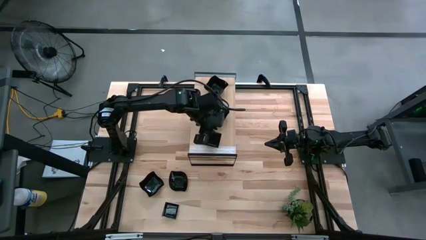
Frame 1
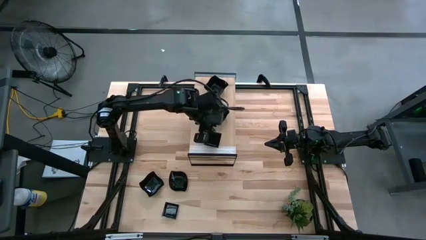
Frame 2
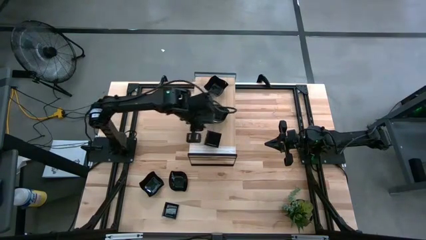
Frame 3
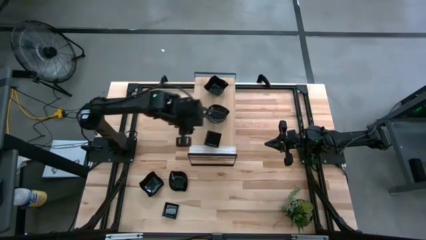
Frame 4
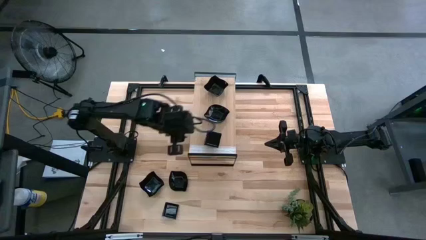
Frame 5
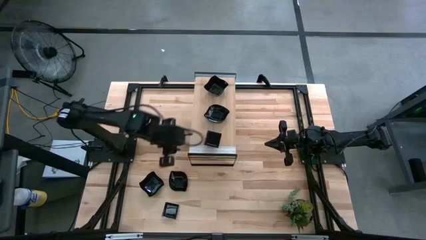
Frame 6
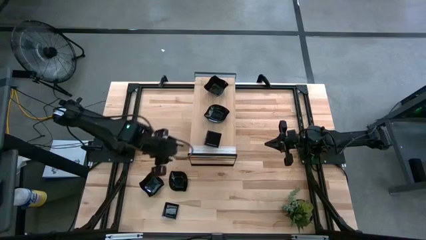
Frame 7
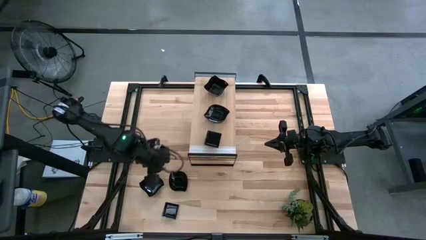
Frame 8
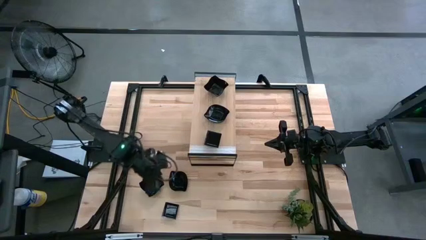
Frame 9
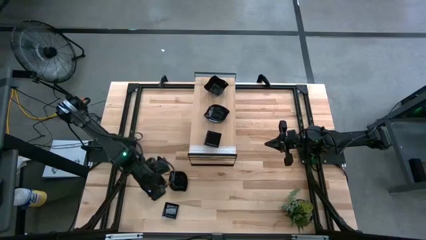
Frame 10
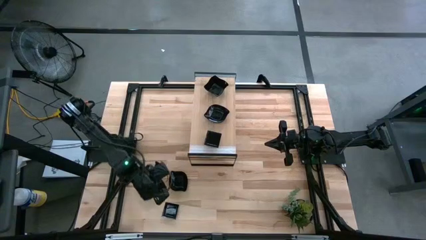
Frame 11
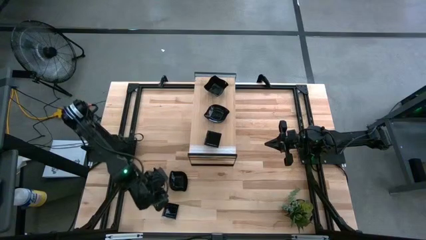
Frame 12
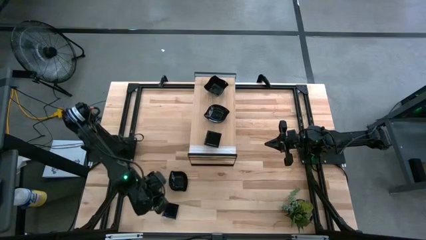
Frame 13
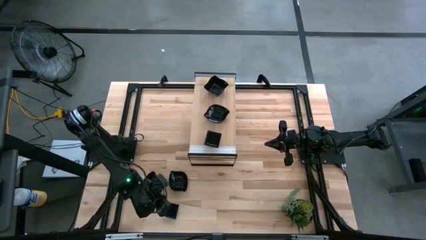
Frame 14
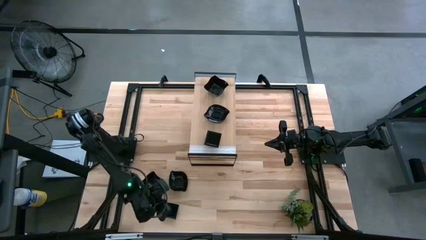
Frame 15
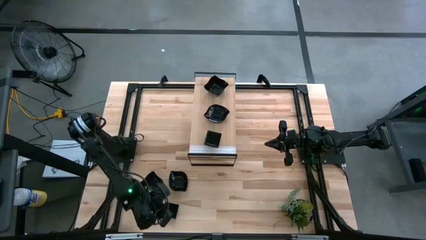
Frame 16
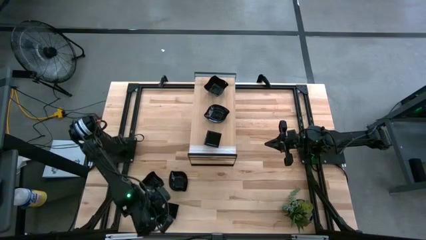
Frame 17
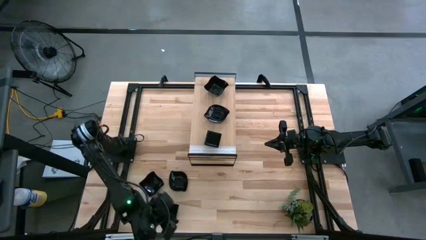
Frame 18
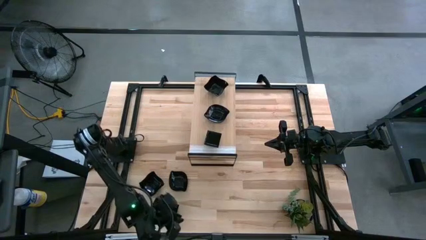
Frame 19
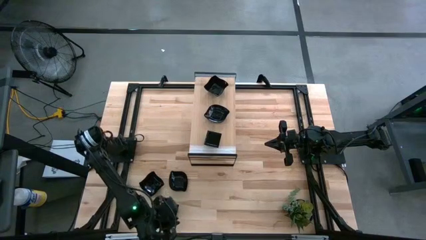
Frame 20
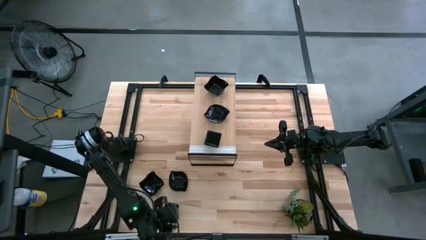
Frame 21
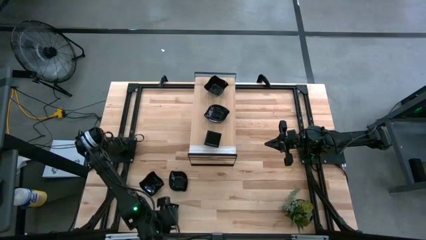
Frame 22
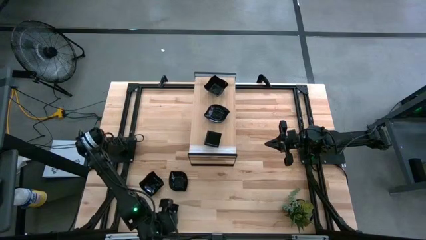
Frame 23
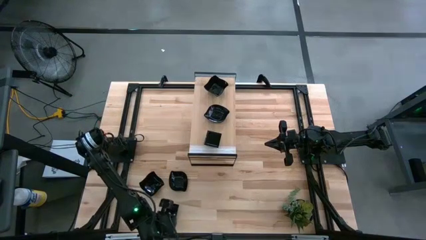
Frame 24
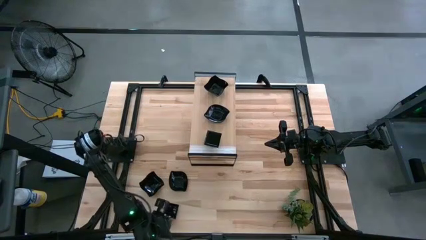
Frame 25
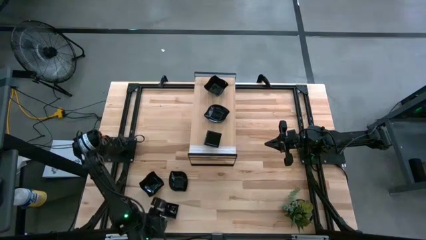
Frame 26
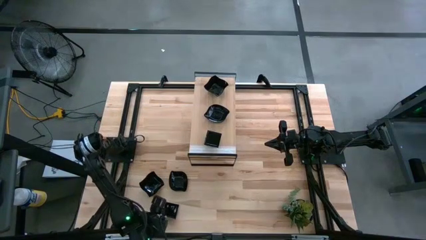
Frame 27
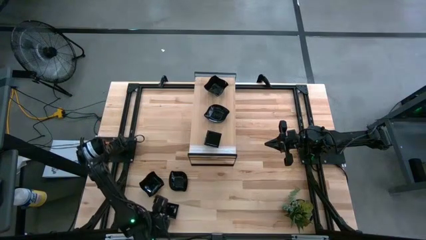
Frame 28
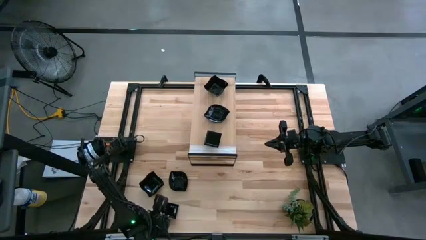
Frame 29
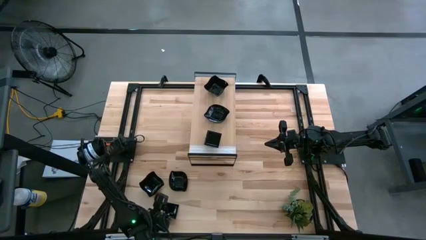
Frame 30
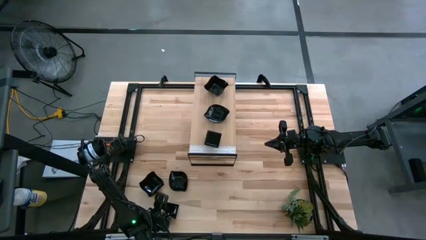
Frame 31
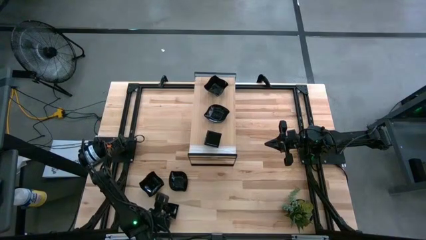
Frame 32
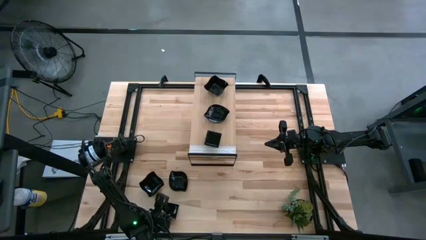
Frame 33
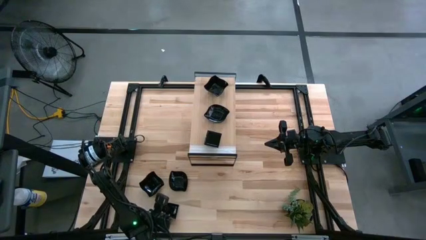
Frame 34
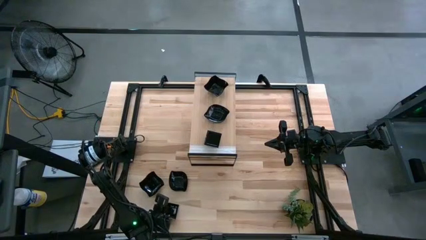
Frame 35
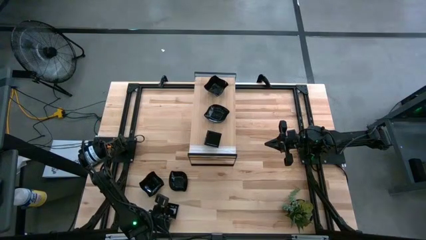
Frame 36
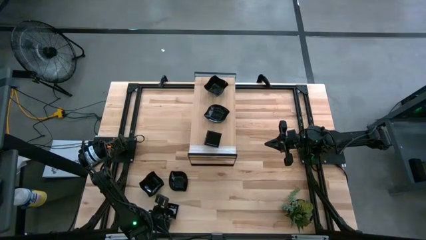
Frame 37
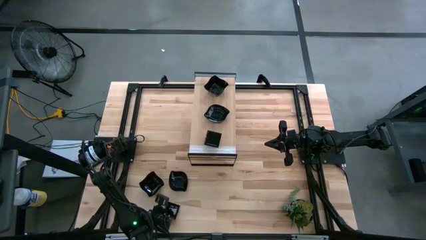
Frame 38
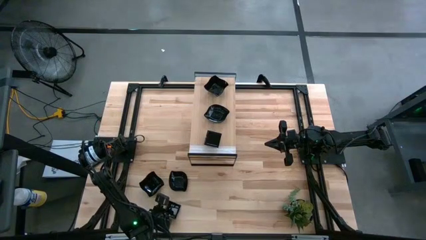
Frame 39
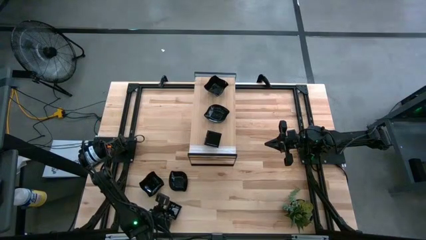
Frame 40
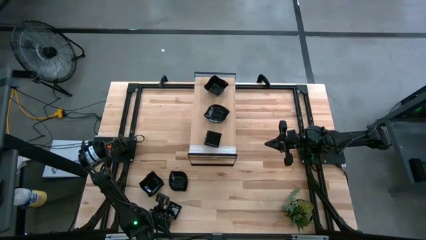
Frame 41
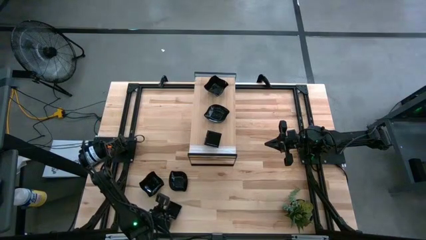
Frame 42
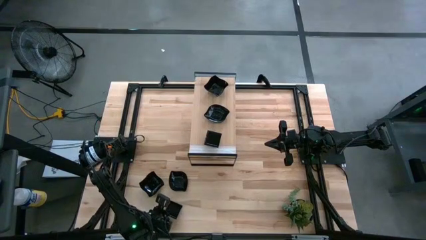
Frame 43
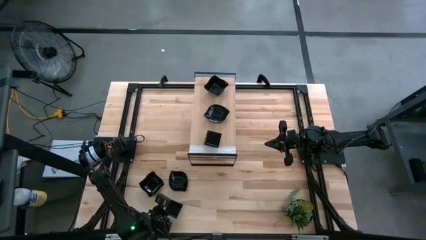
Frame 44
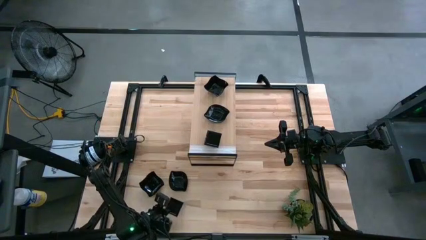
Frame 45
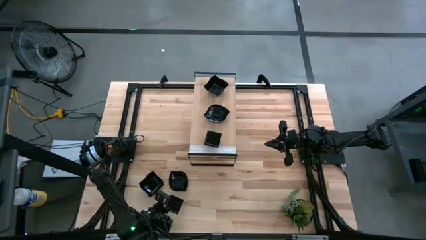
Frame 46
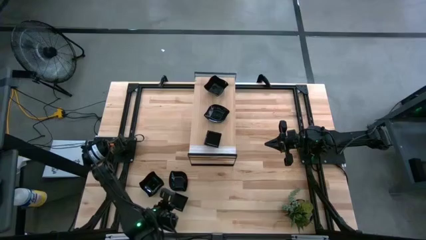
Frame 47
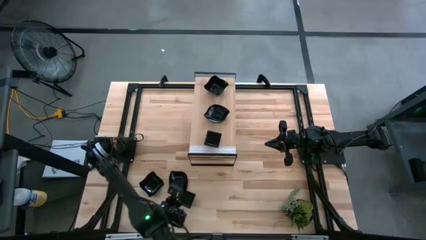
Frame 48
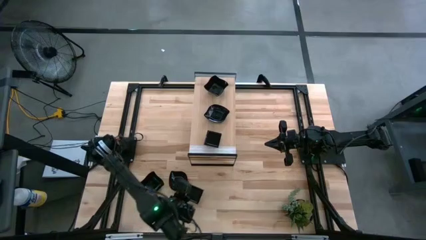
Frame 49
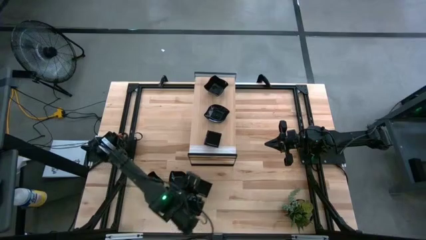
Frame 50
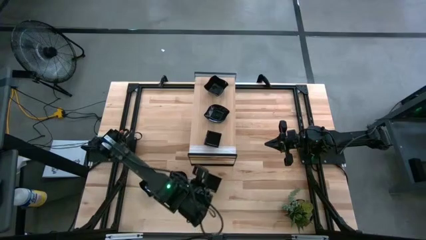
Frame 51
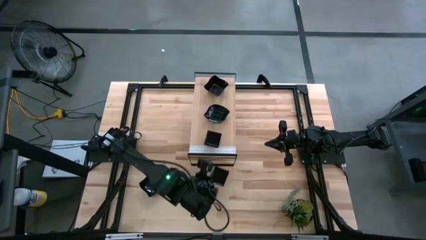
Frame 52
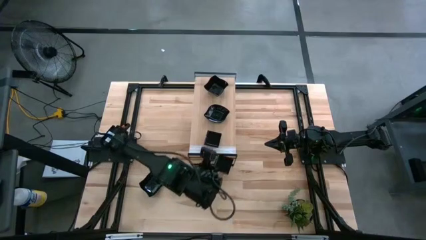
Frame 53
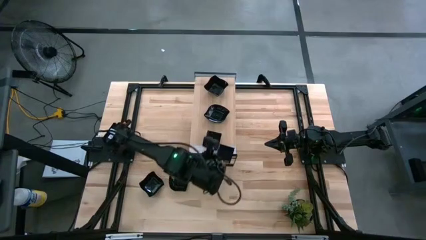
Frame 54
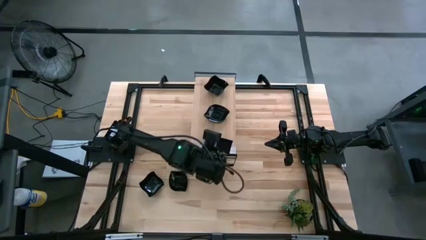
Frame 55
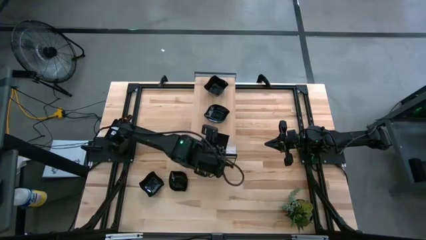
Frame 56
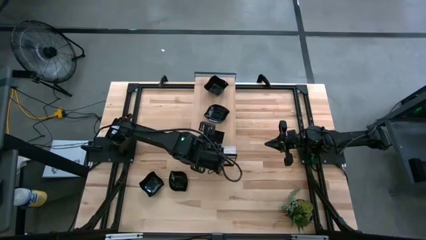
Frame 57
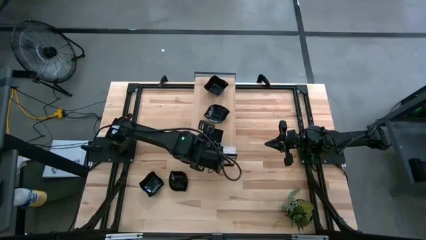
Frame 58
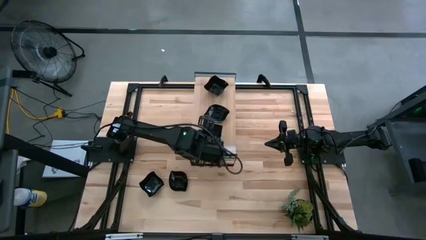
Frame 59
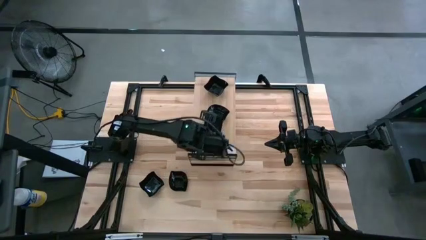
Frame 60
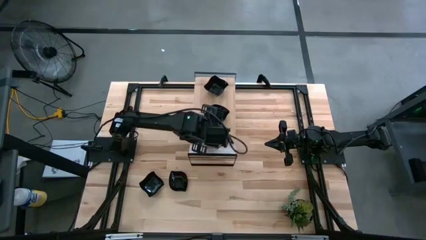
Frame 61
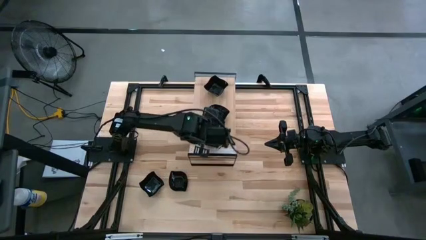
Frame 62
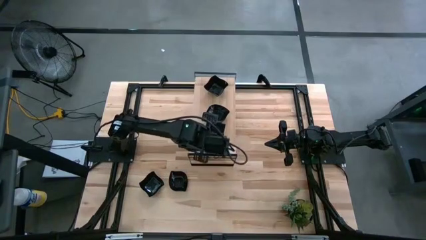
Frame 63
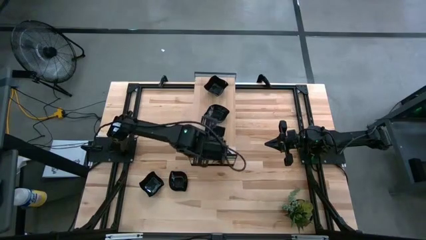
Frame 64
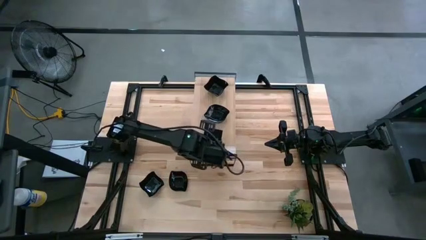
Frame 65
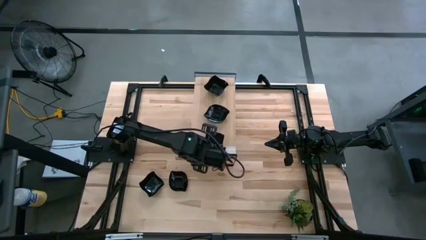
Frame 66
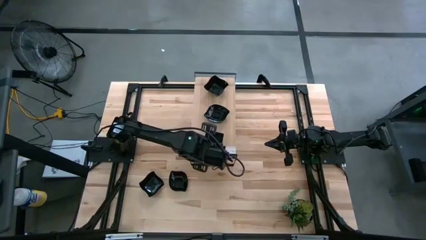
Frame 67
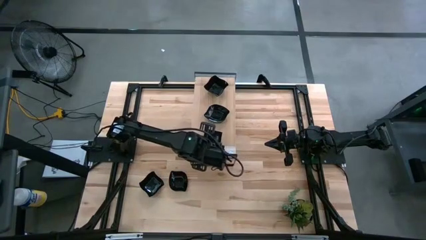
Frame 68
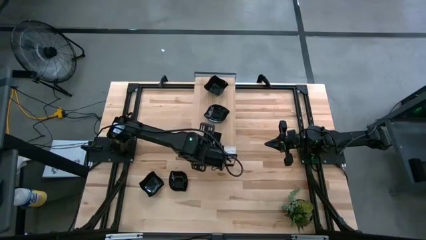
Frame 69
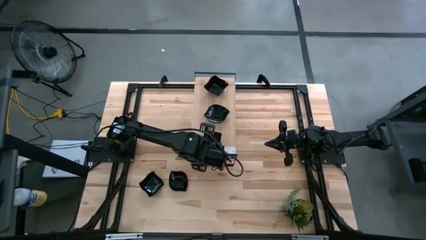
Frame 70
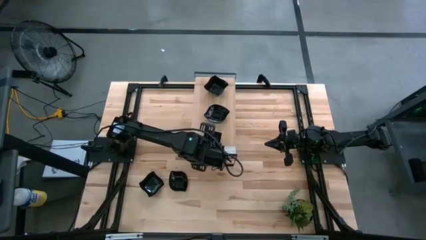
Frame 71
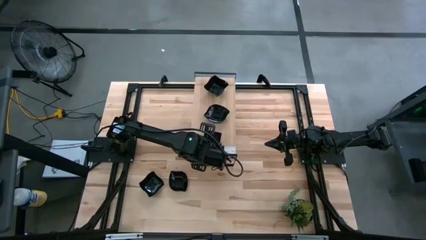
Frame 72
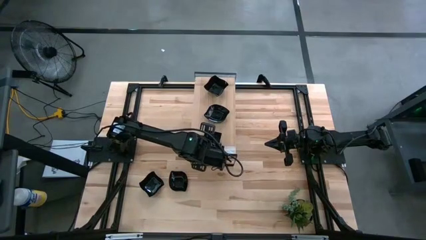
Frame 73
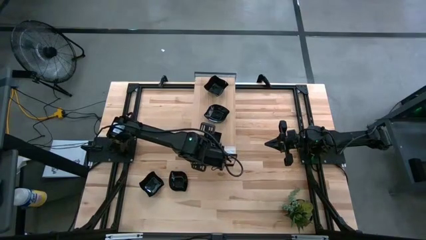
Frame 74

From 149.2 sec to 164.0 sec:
Task: Pick & Place Mini shaped plates
Stack the square-shaped plate on top of the stacked square-shaped plates on the shelf

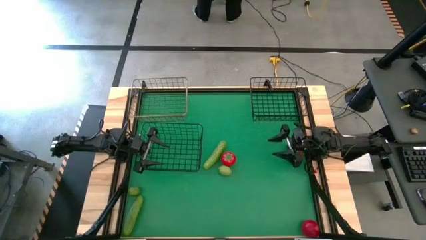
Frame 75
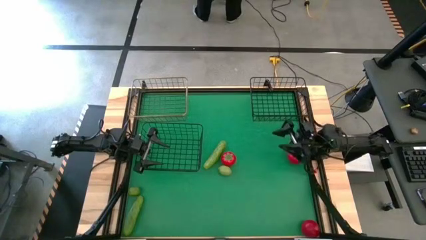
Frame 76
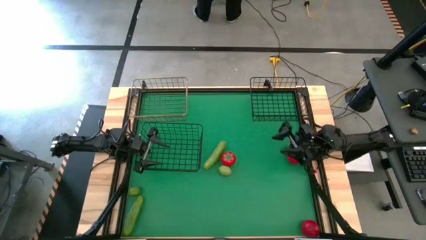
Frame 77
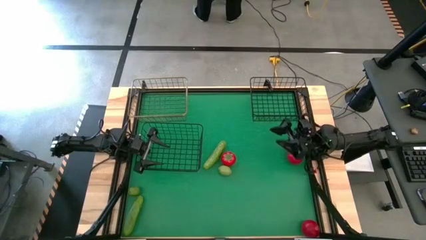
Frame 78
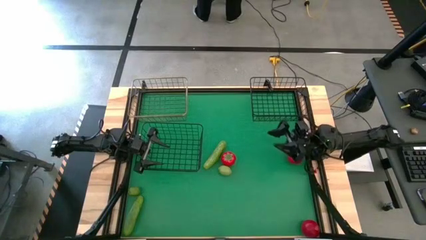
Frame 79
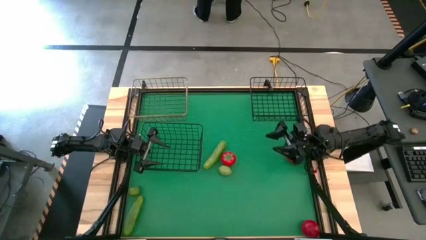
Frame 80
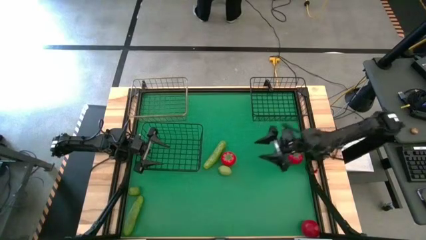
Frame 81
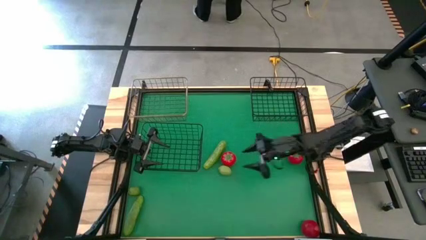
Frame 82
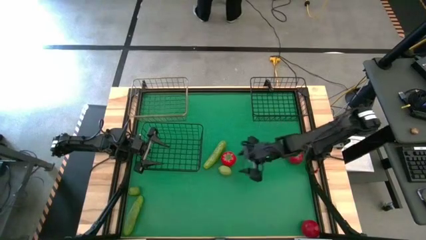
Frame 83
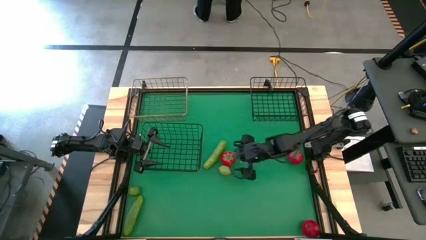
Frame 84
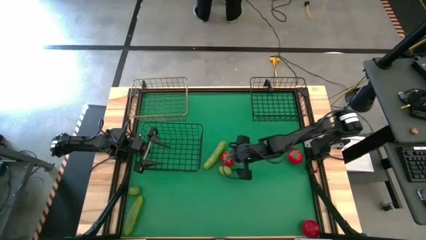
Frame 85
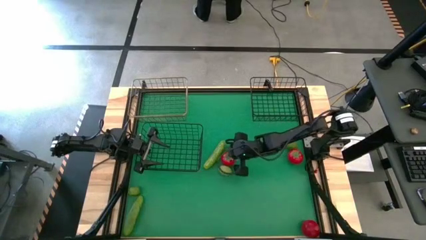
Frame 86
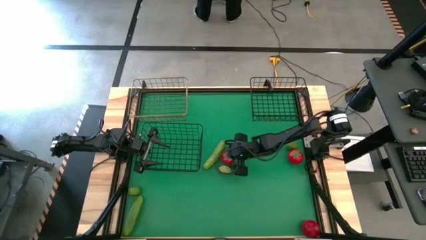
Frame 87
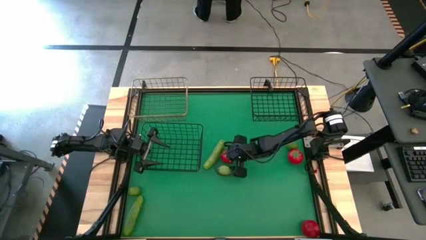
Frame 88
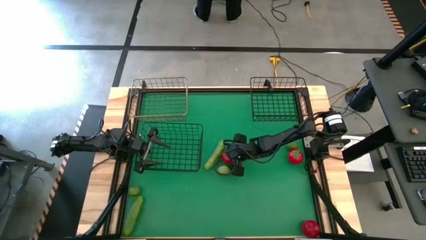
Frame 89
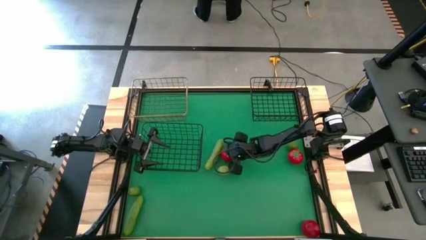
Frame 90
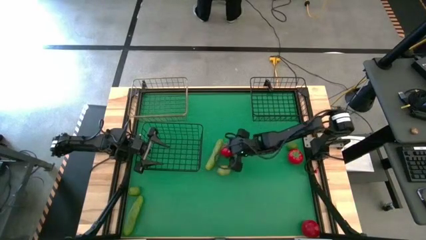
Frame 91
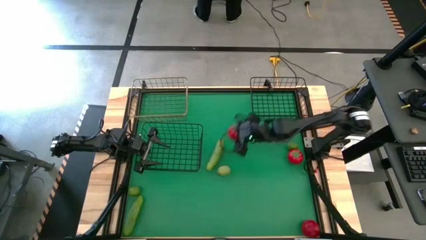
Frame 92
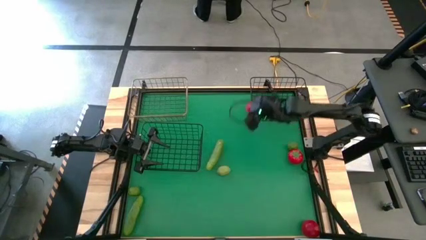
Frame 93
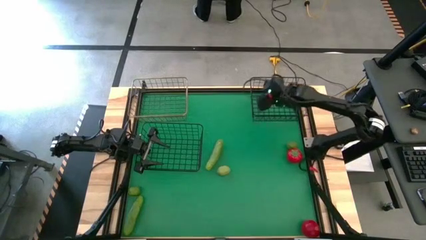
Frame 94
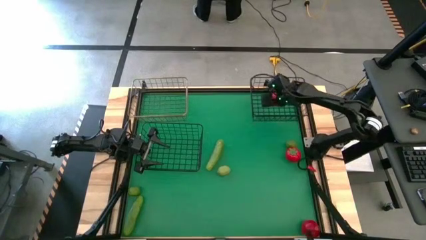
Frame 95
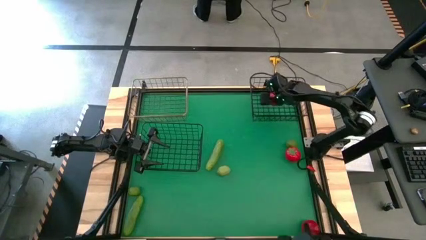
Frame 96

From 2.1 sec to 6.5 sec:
Task: Sort produce into baskets
Put the top left tomato into the right black metal wire basket
